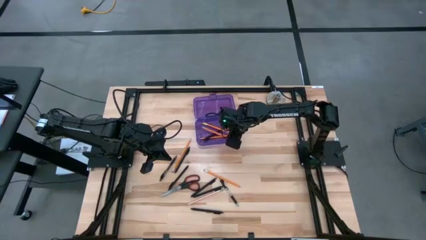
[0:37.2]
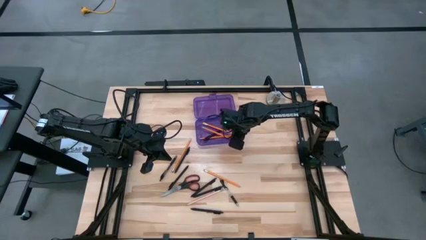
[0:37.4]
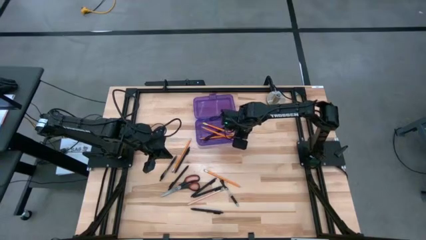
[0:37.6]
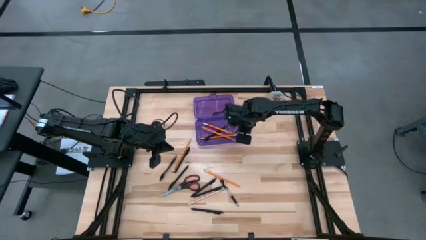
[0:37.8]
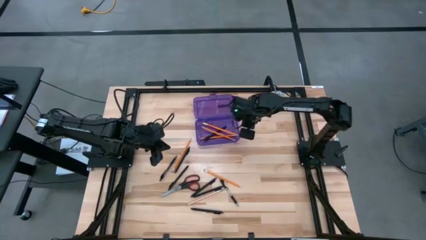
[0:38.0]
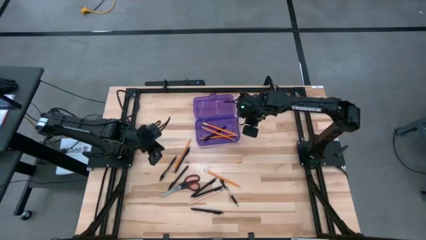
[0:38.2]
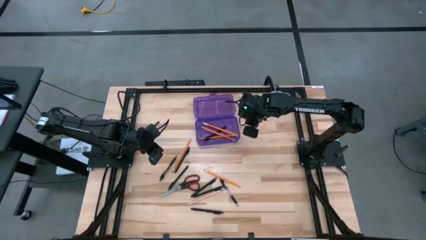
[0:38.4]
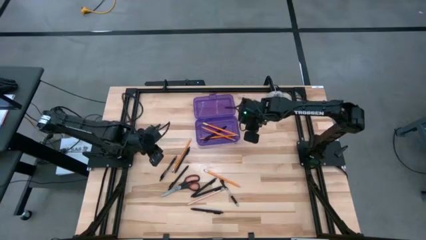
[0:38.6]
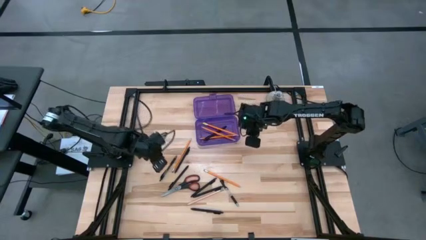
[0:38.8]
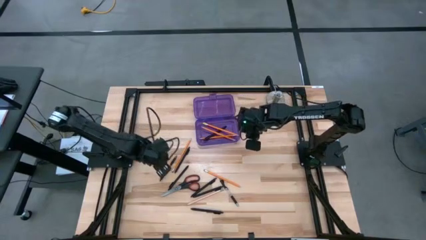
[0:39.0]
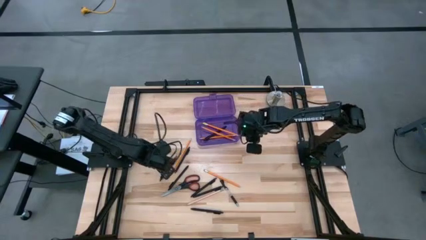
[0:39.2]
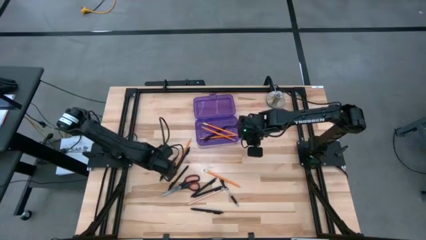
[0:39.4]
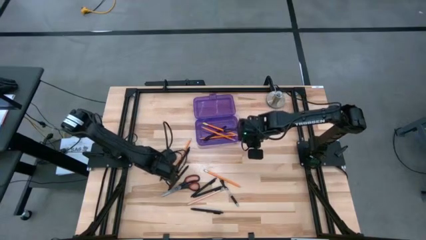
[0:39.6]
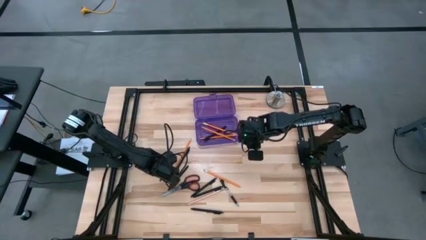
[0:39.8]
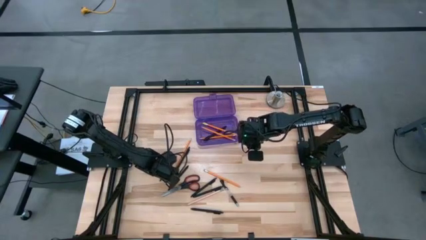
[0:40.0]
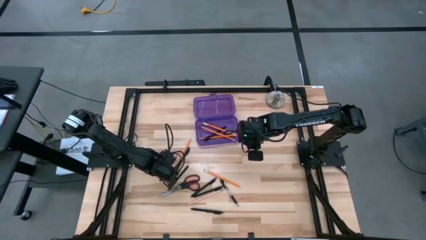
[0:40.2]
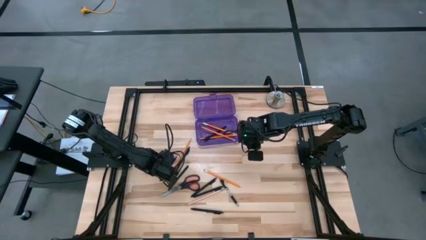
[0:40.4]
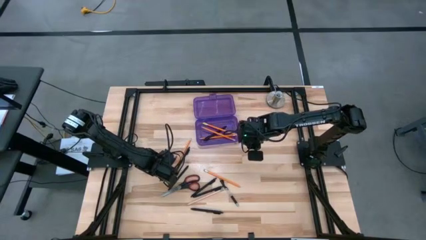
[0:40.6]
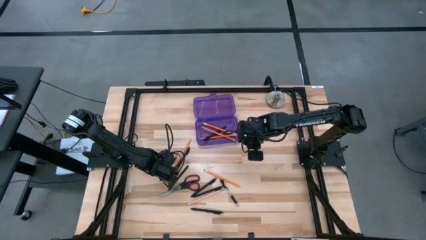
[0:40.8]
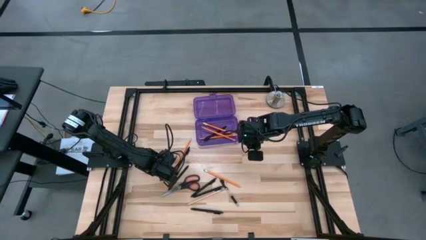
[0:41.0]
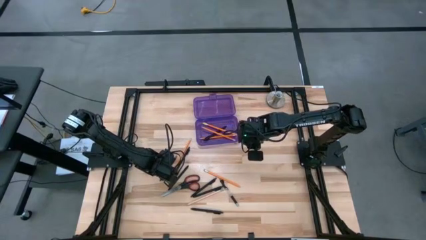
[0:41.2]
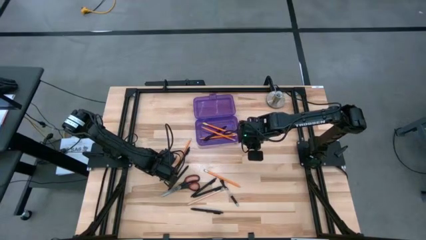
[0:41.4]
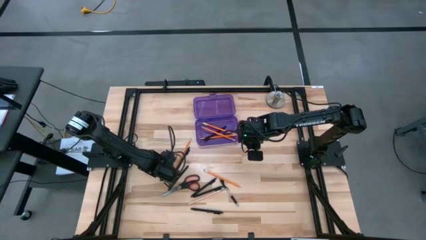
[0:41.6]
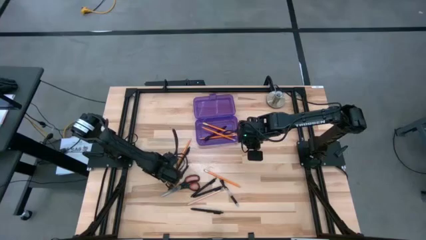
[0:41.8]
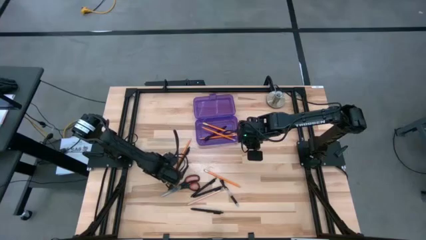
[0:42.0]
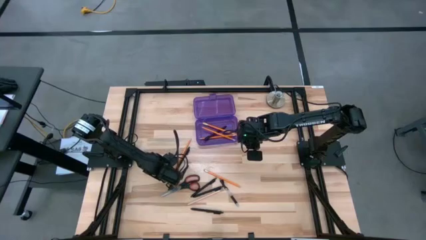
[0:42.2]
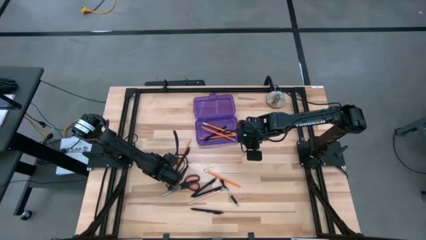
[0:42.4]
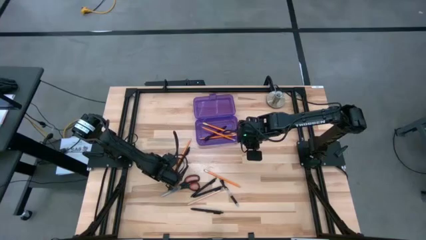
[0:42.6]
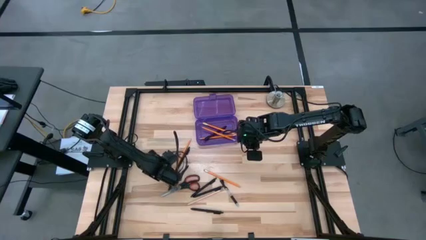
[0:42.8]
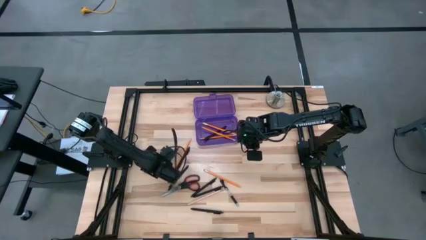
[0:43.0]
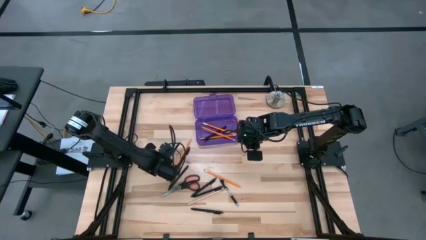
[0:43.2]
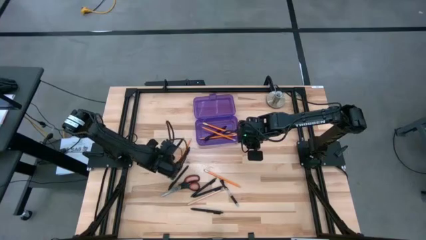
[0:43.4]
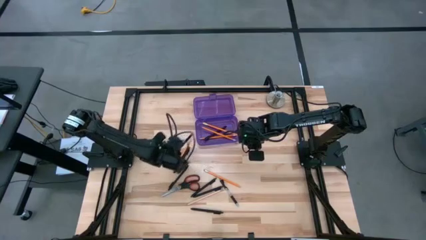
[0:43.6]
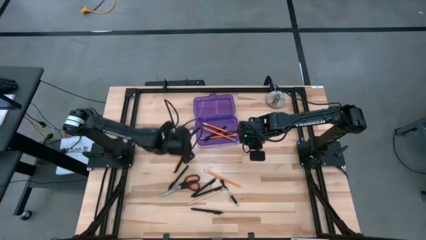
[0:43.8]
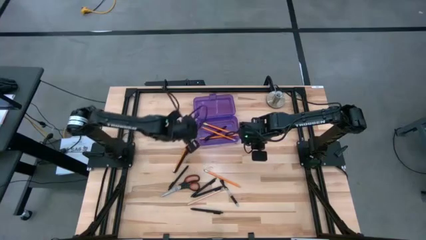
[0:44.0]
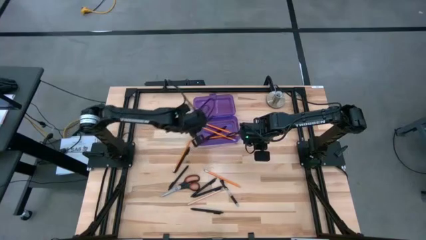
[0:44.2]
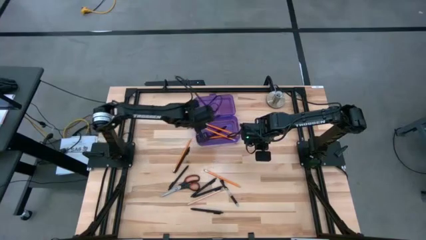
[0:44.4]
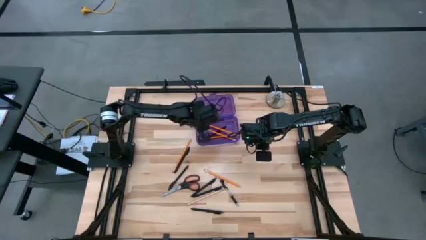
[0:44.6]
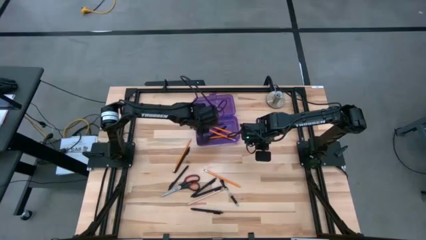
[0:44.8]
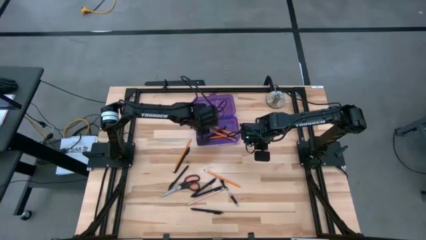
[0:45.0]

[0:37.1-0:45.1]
Task: Pick & place school supplies into a supply box
Put the black pen into the purple supply box

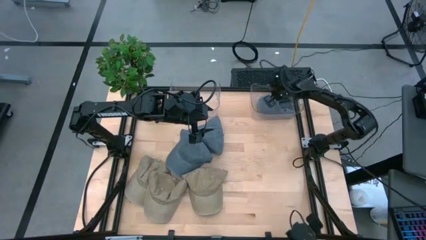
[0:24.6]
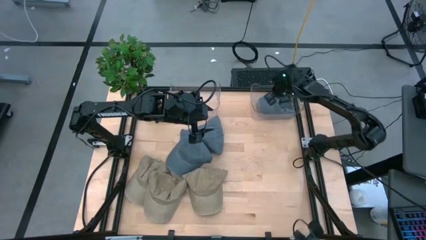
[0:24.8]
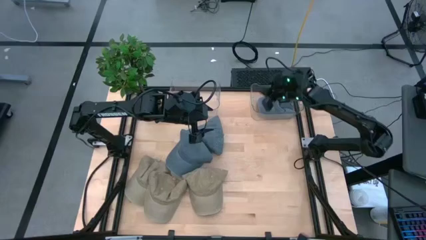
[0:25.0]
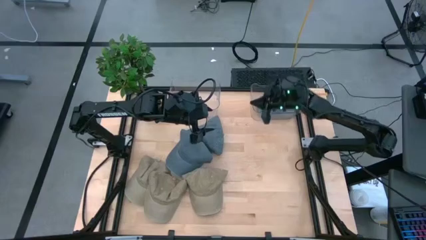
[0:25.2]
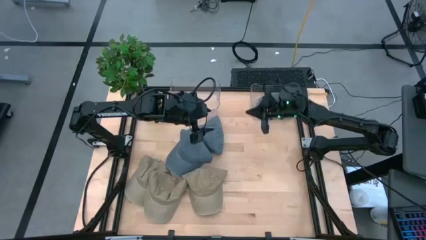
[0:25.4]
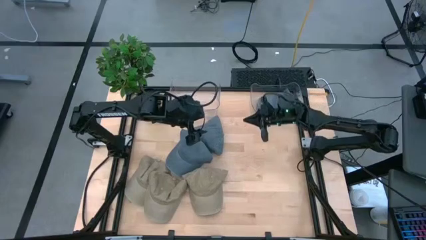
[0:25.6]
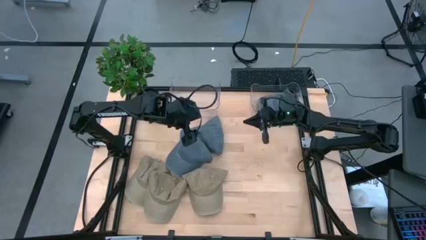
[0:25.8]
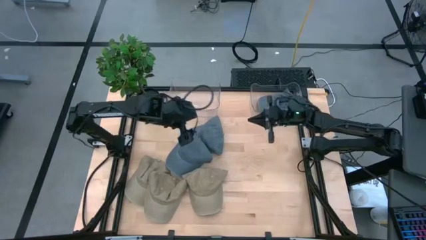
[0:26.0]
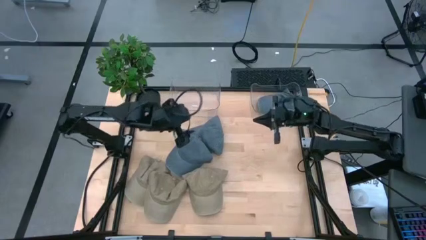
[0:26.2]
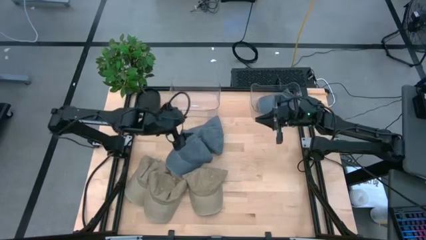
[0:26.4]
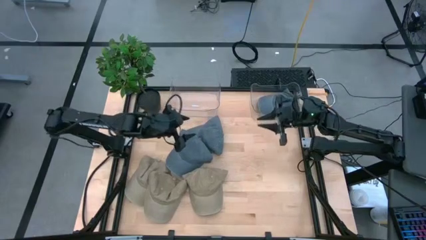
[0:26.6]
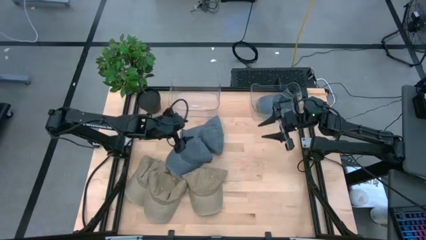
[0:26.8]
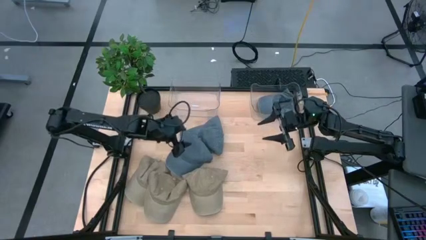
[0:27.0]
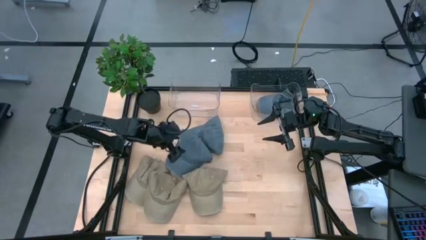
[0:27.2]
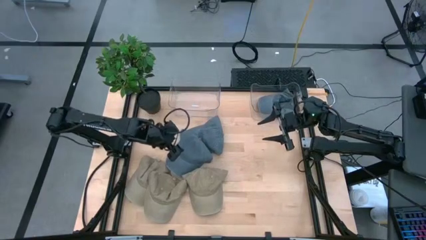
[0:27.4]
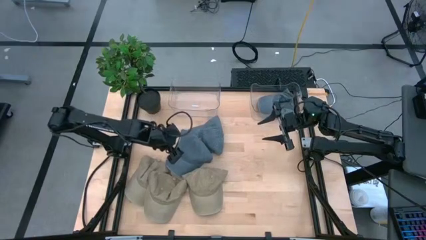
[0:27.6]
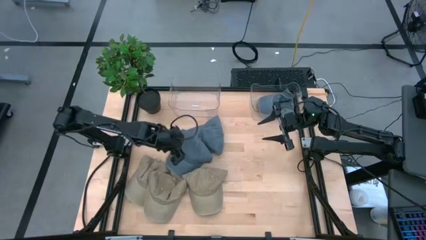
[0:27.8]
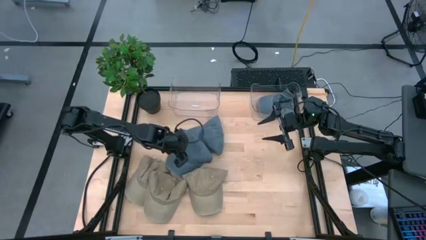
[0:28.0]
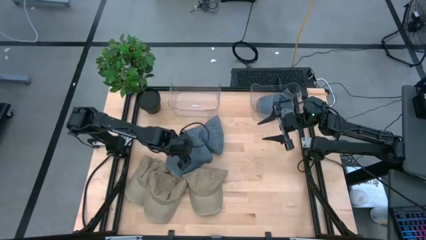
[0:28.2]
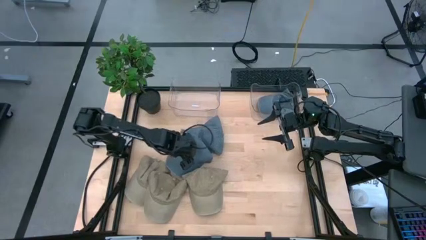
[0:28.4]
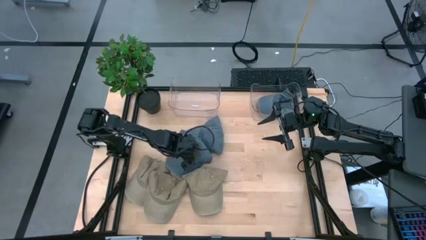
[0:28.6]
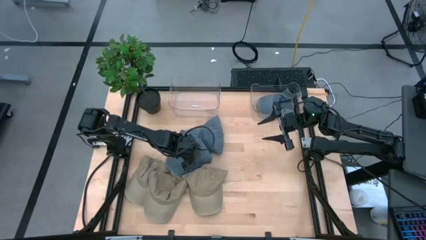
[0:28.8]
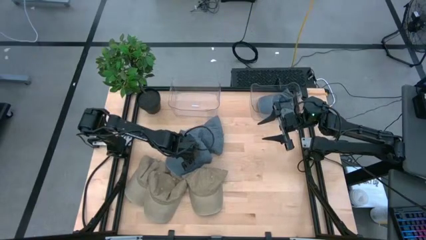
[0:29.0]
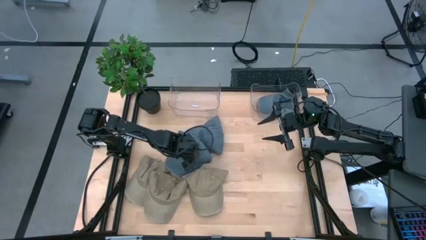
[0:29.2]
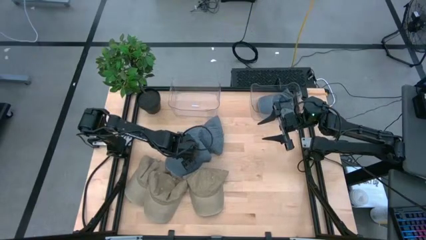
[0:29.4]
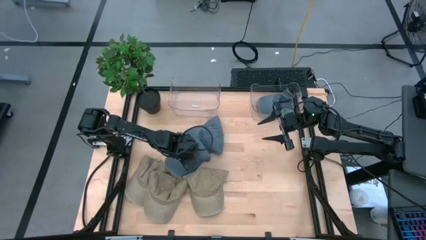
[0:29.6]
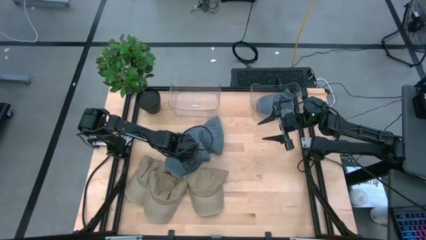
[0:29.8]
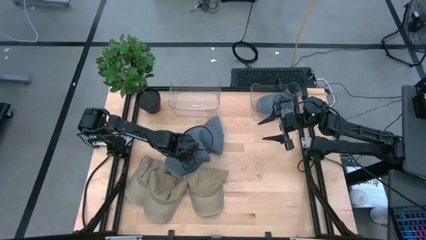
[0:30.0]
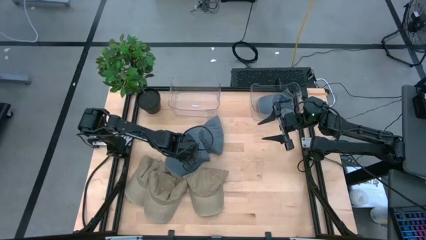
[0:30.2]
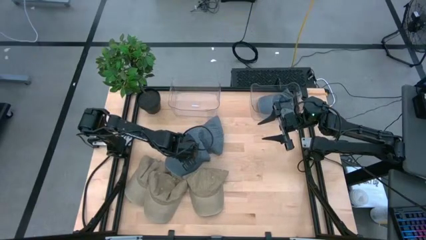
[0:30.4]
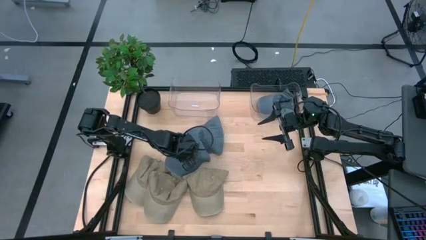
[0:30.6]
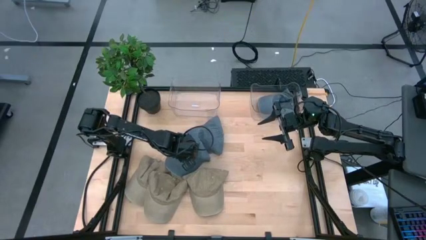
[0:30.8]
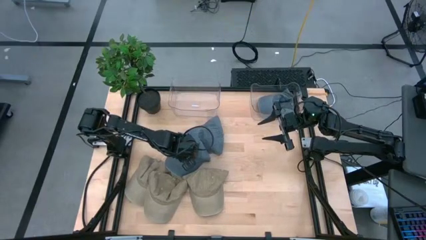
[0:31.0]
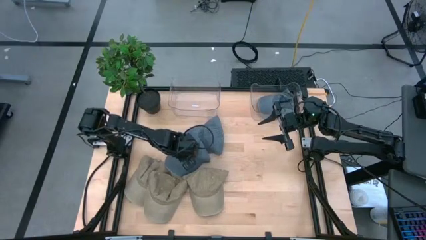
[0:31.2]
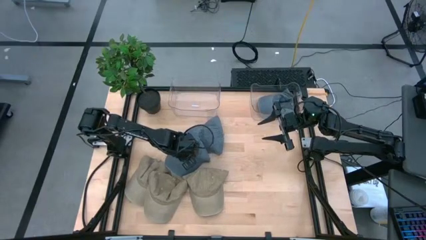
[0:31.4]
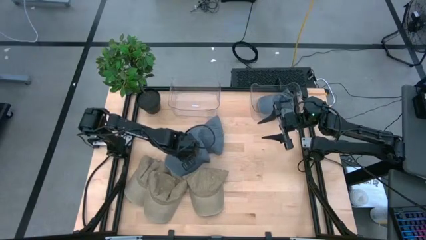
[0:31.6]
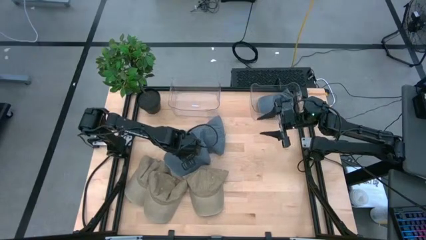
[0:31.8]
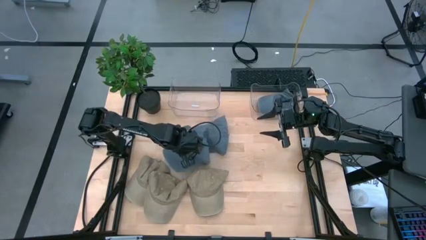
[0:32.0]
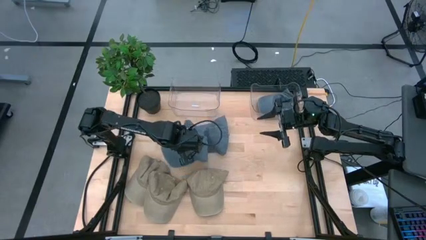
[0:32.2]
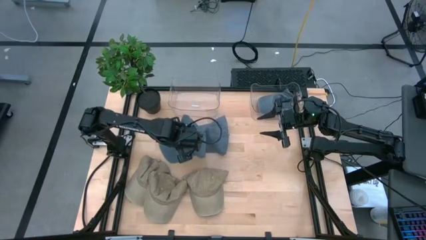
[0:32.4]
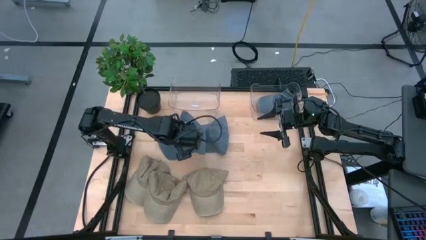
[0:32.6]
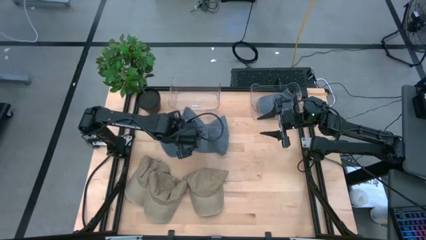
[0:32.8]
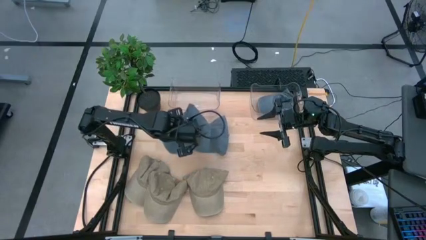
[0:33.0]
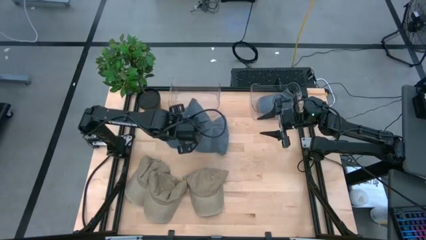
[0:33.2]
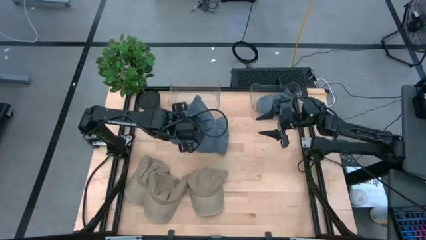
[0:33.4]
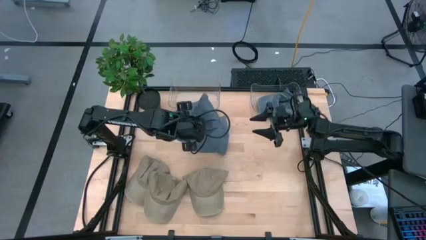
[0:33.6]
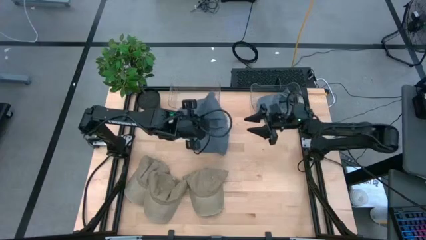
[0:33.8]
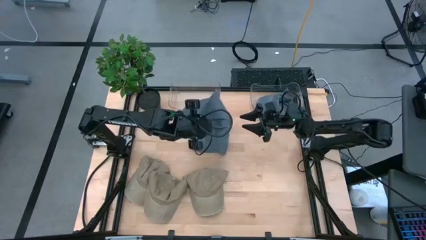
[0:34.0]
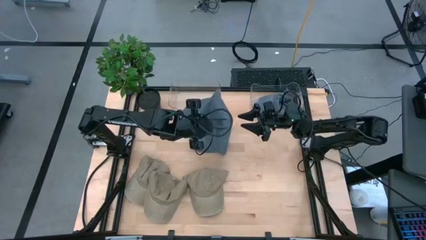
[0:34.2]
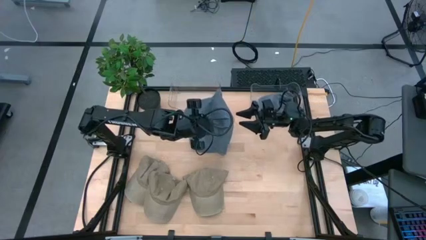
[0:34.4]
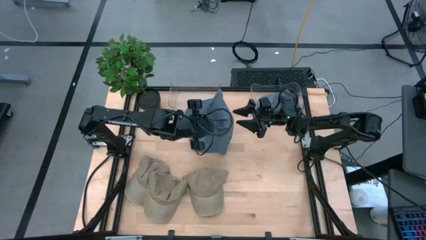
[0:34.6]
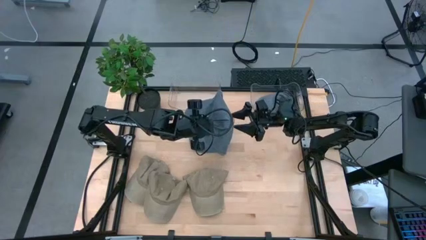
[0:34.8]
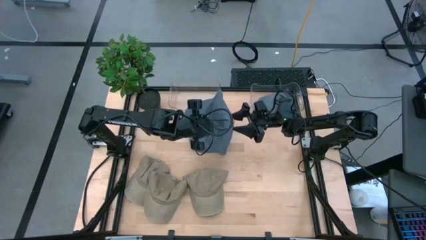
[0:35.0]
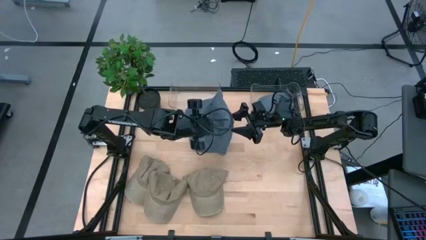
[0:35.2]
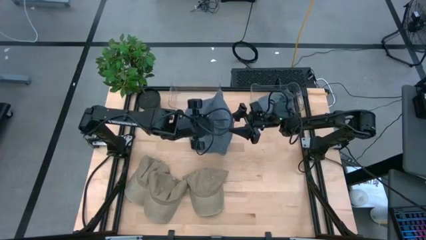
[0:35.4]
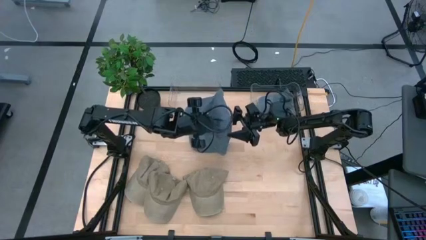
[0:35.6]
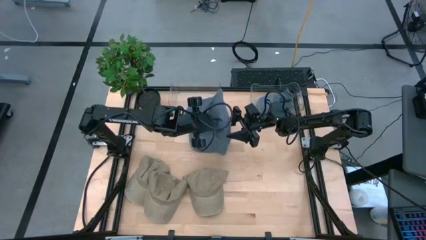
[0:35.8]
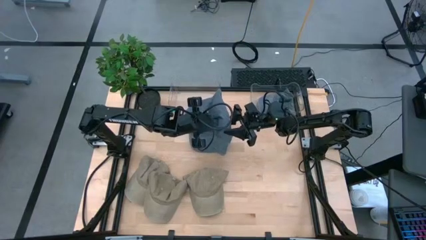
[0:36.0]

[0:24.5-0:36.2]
Task: Pick & Place hat
Put the left blue cap into the right transparent bin
